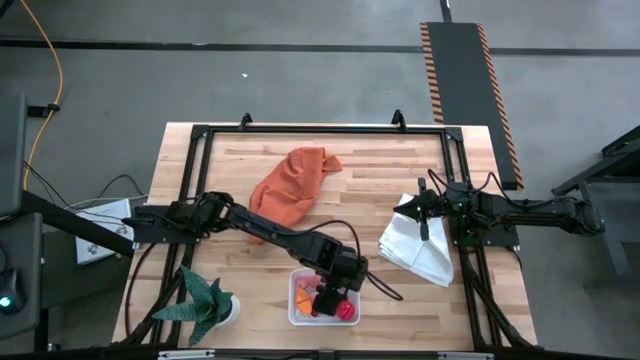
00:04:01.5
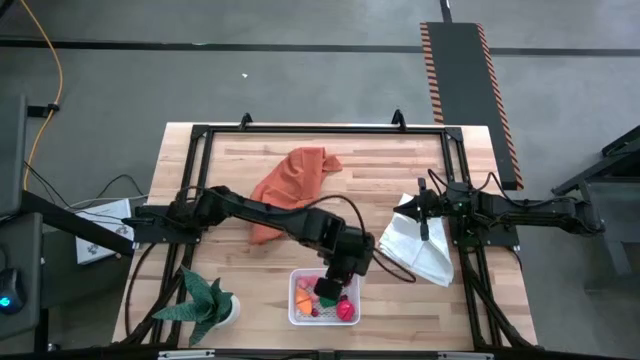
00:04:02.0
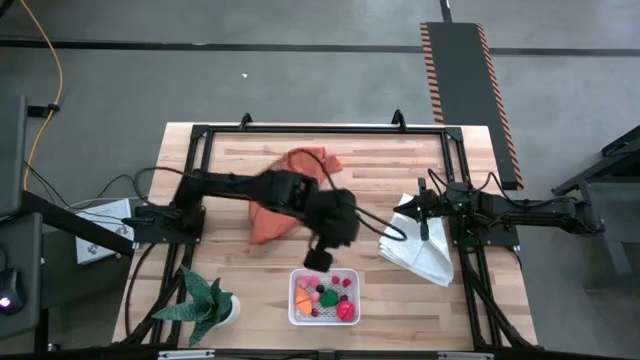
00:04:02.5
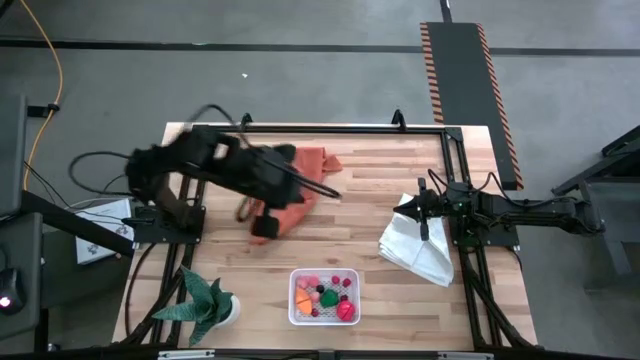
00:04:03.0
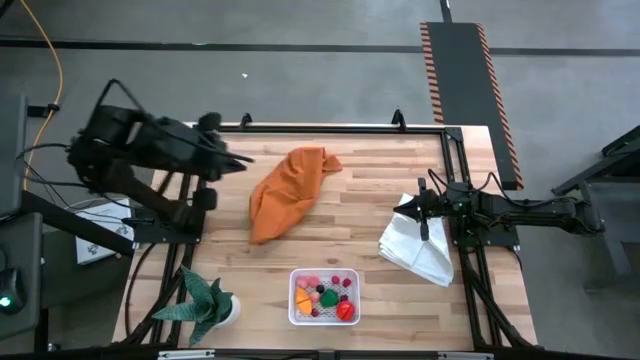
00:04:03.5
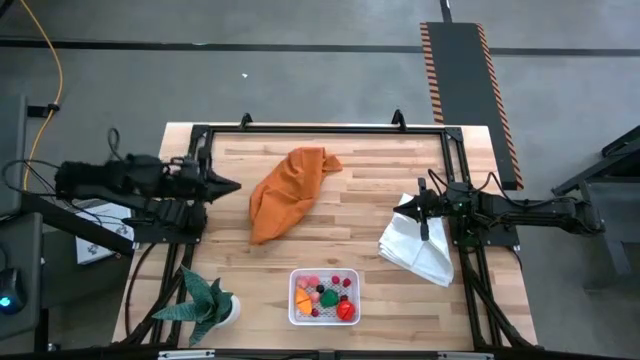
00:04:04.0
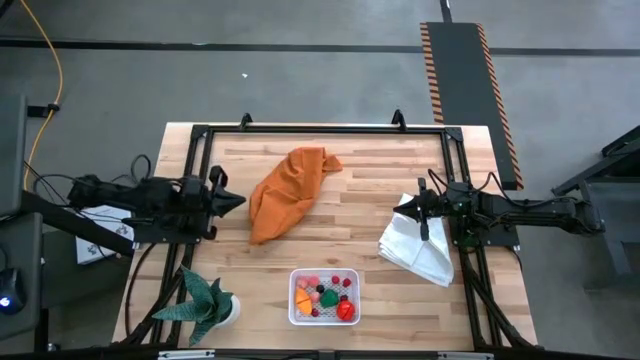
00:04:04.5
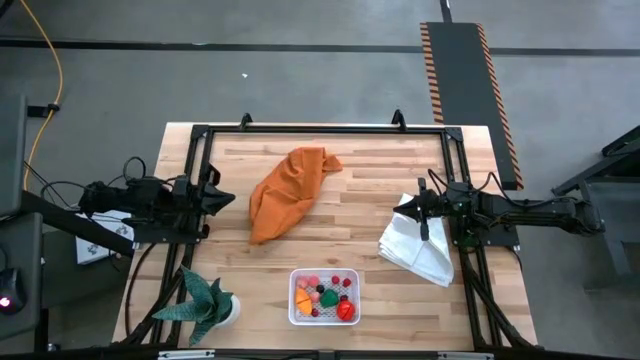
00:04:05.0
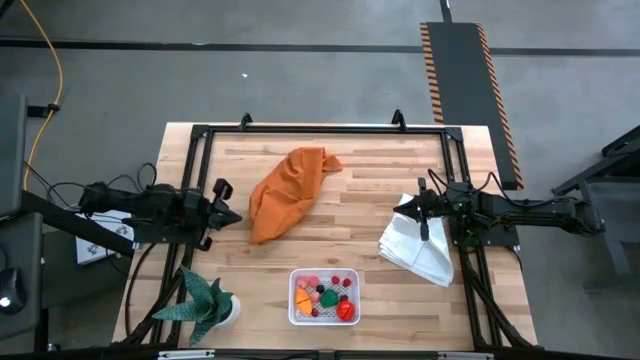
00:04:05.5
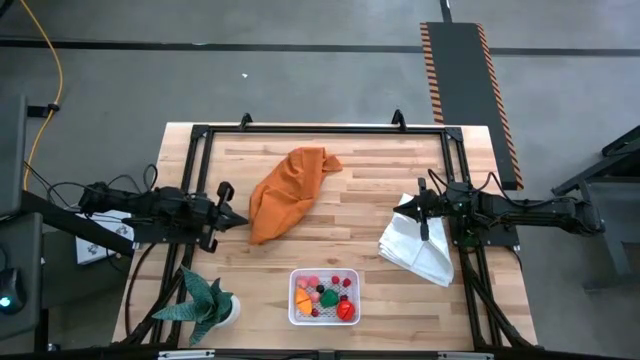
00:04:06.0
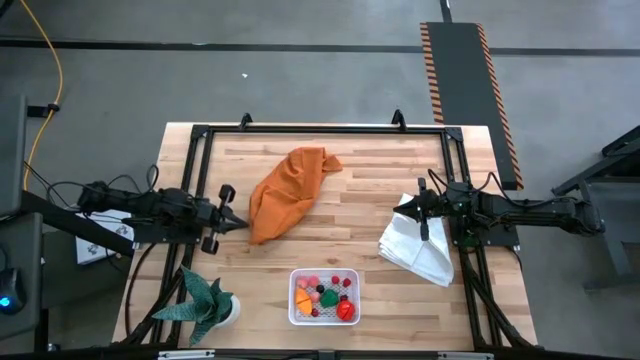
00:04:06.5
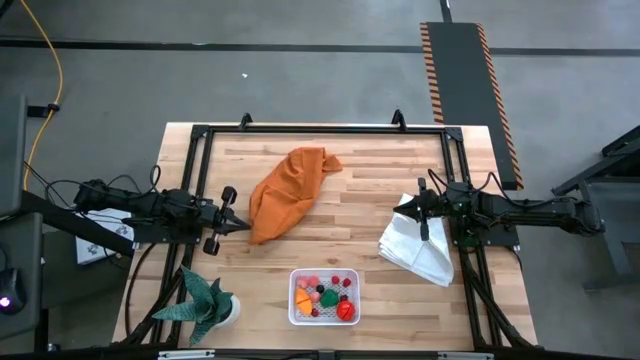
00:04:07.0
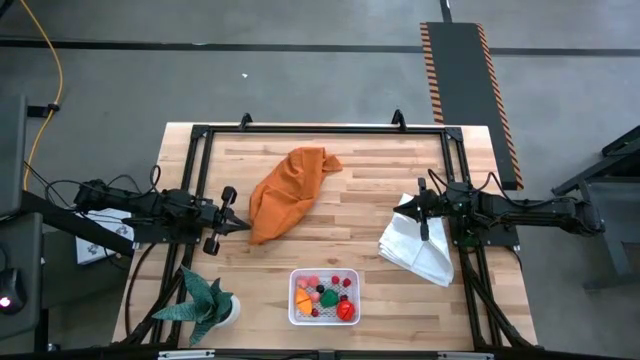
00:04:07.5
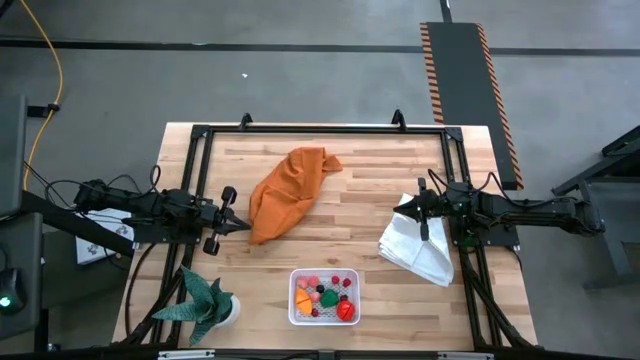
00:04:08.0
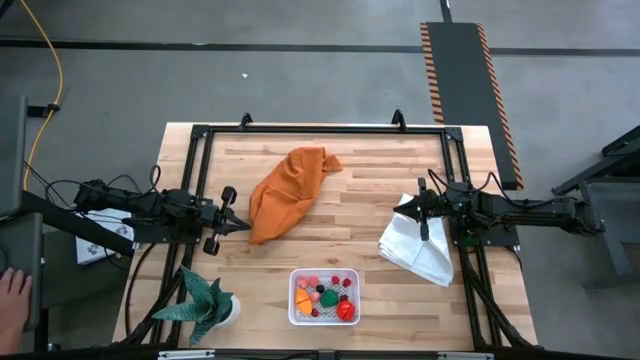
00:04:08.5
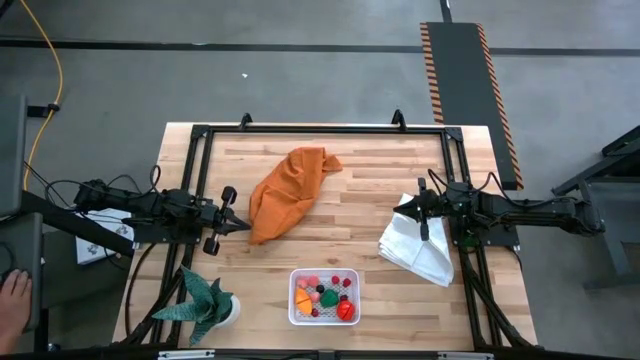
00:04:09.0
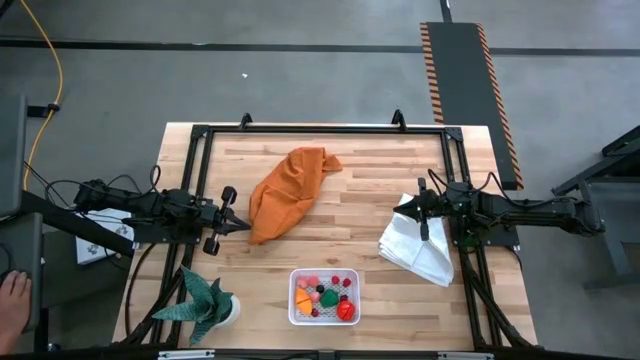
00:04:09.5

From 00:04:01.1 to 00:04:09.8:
Task: Pick and placing Produce into tupperware
Return to Home Position

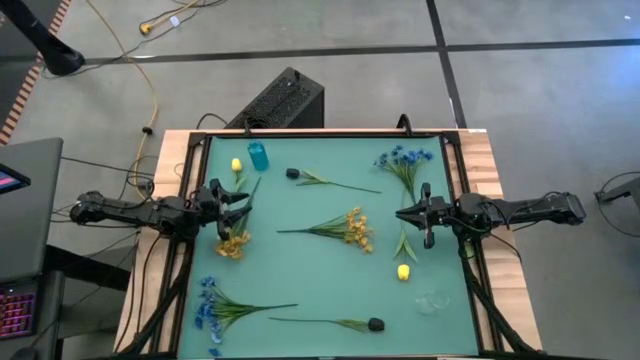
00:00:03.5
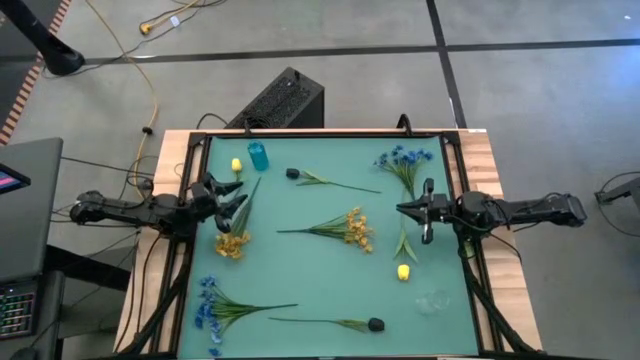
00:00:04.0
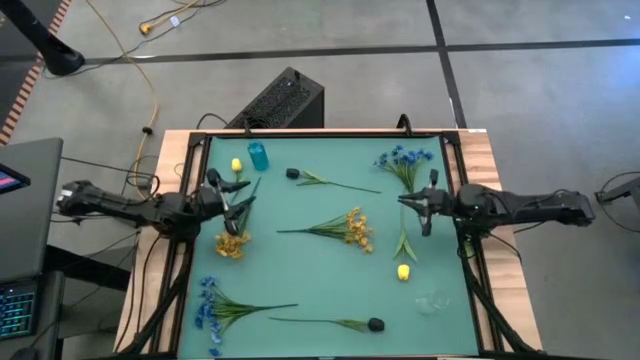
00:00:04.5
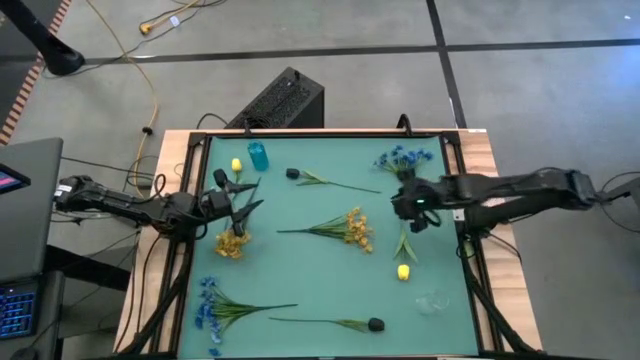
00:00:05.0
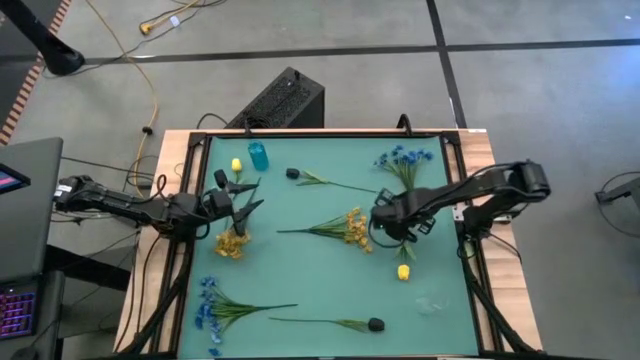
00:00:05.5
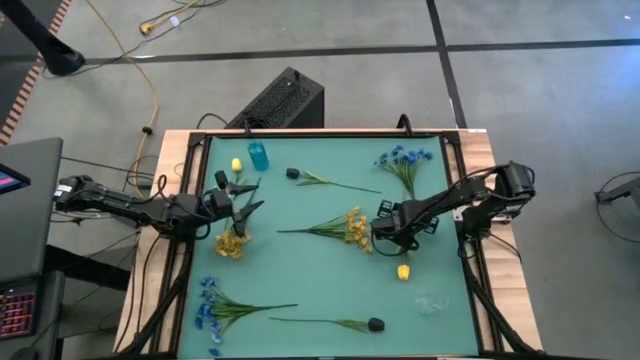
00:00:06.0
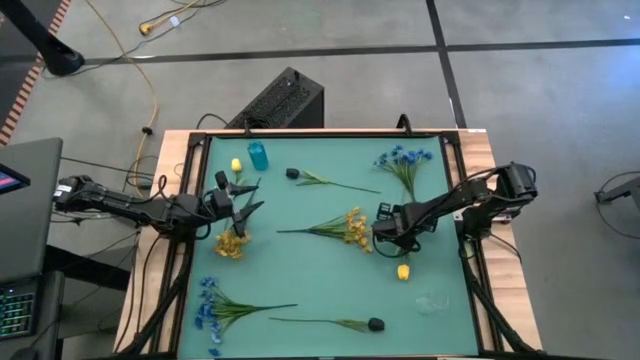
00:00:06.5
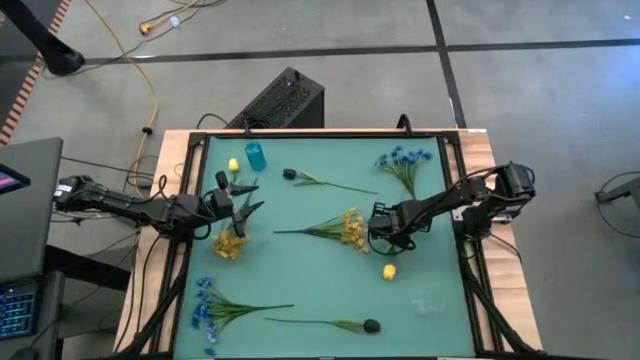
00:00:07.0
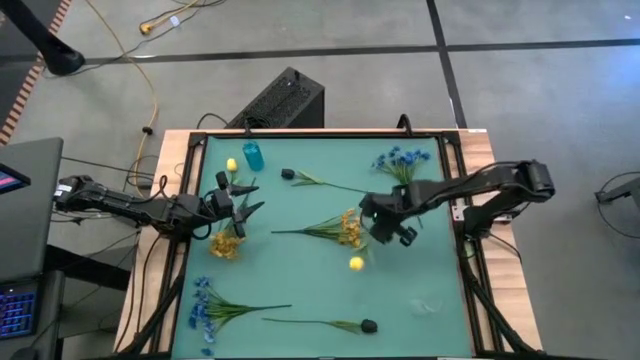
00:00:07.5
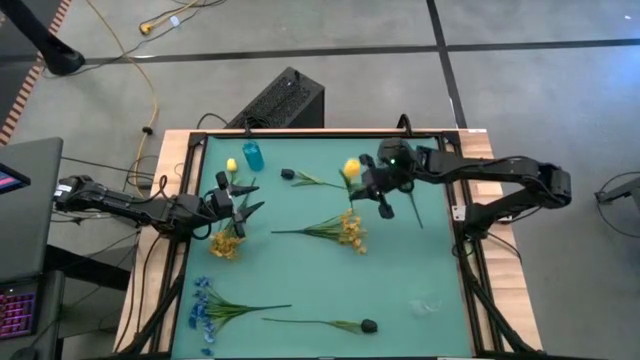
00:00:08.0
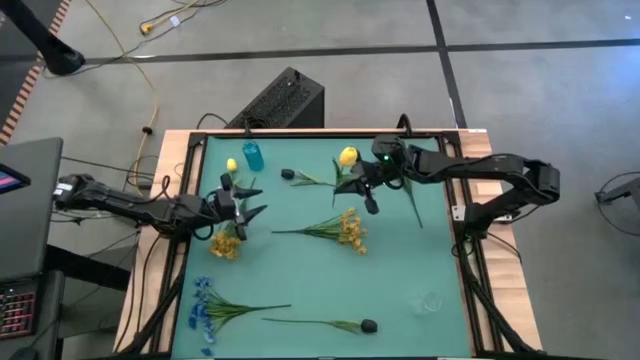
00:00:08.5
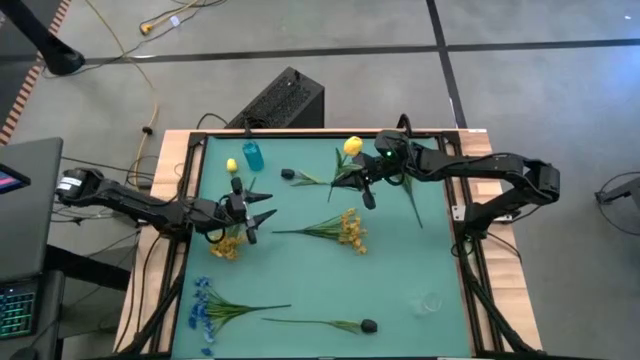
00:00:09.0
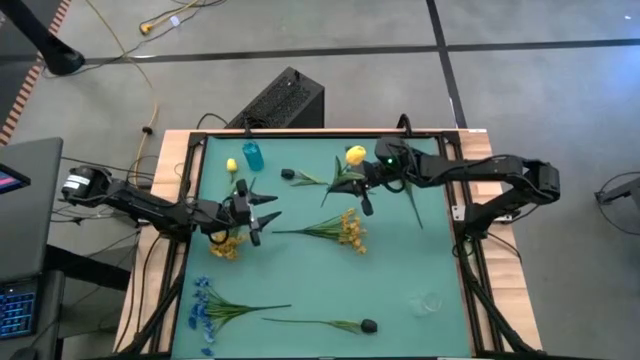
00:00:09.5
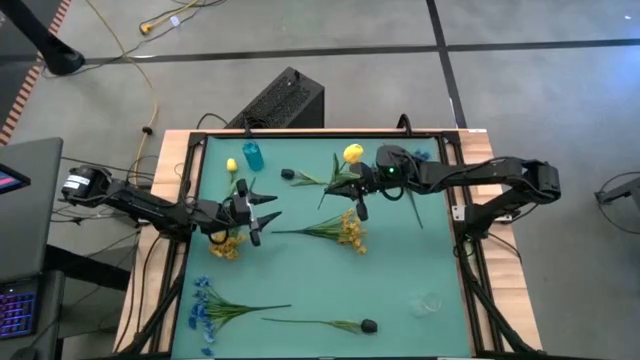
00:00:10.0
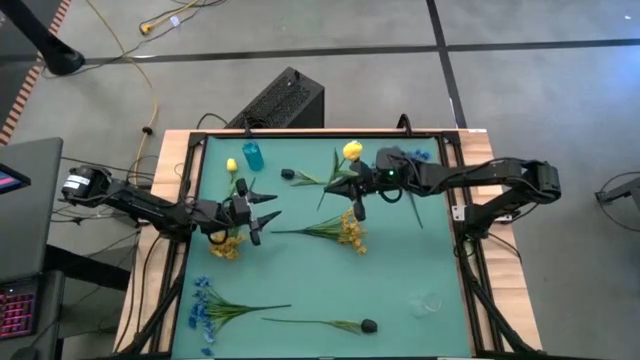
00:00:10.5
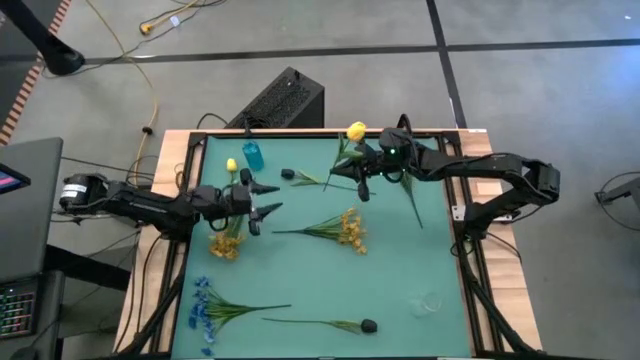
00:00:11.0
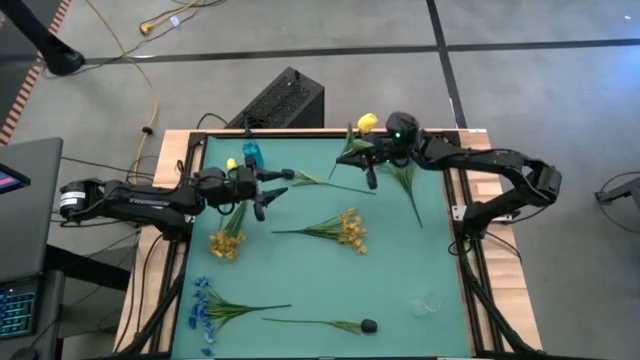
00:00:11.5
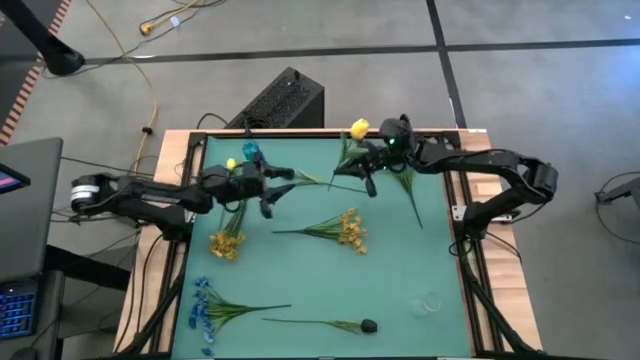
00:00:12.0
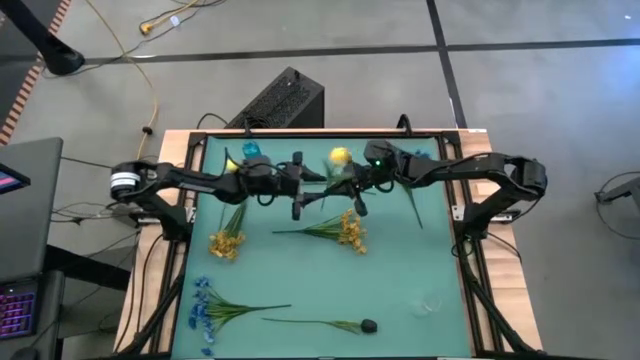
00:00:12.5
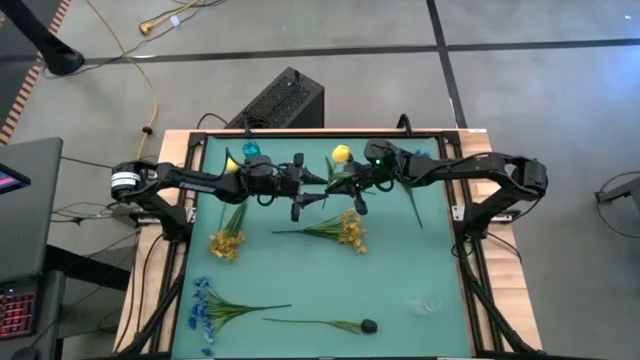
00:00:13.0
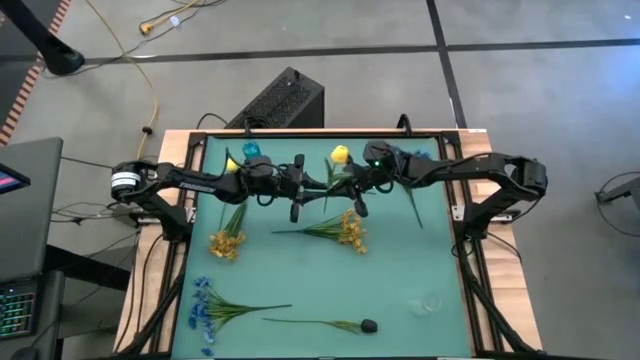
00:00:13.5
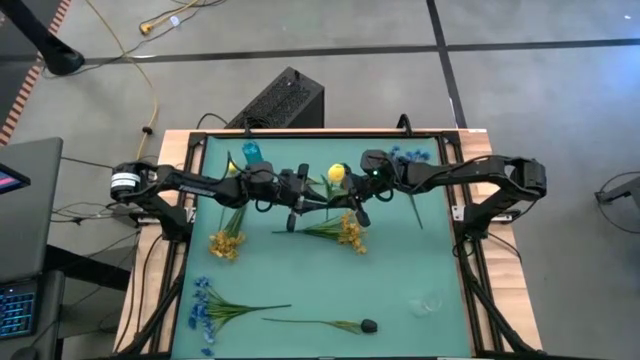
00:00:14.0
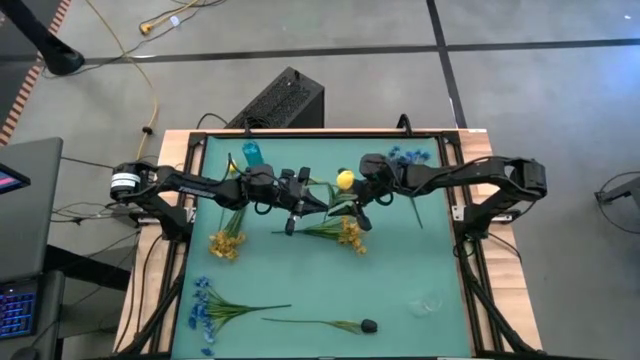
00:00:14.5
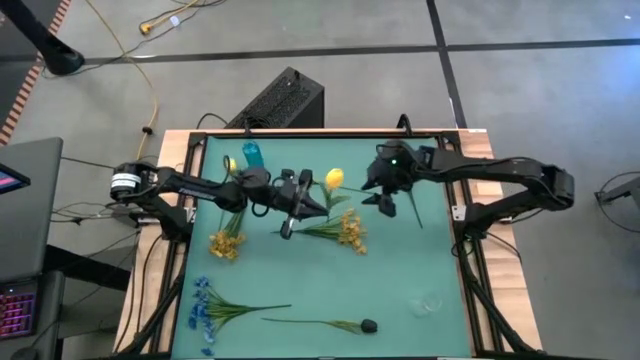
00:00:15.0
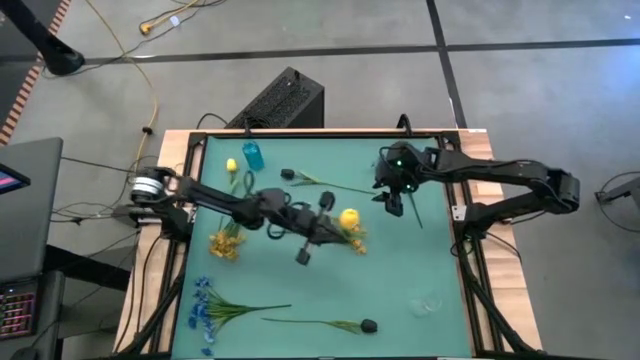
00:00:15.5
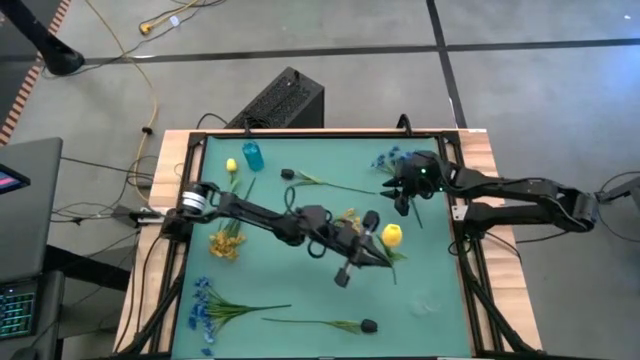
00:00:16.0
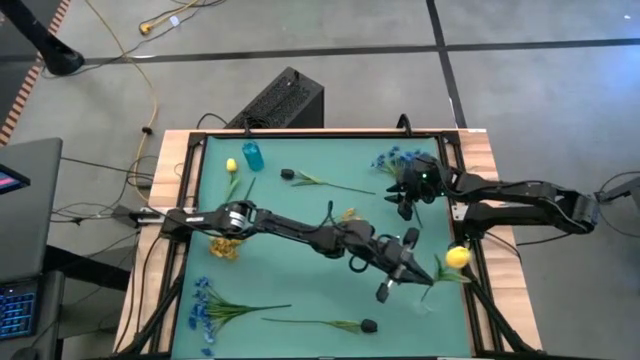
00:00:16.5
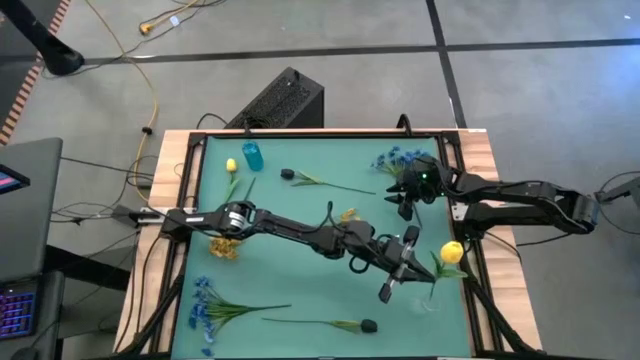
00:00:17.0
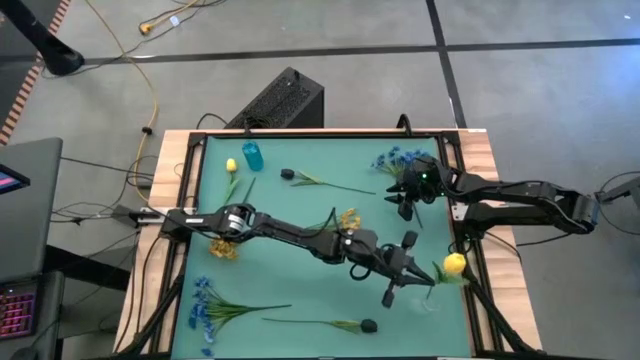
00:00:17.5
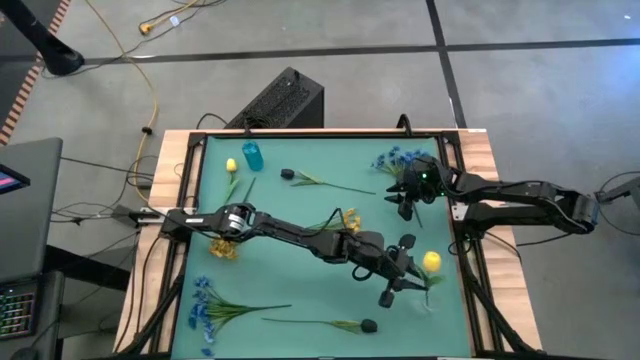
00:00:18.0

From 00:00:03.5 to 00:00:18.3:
Task: Sort flowers into vase by color
Put the bottom yellow tulip into the transparent vase
